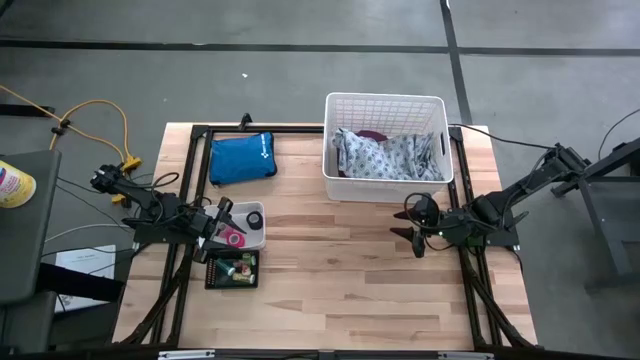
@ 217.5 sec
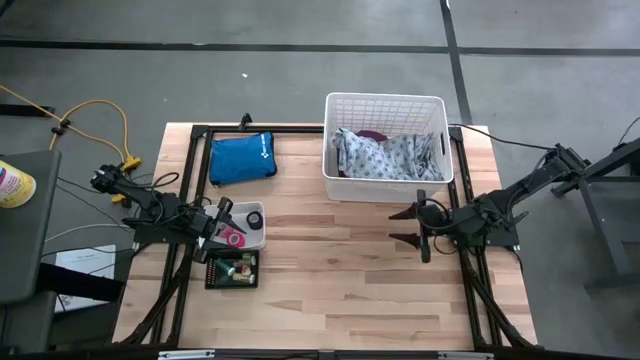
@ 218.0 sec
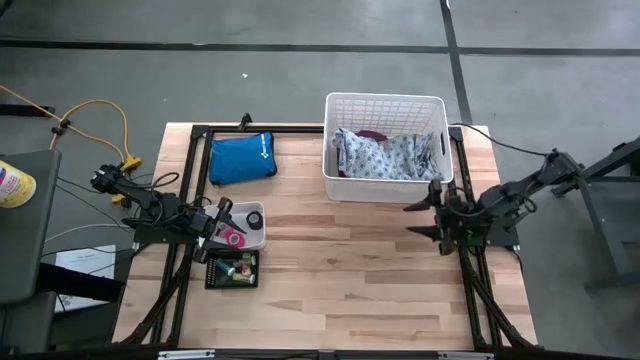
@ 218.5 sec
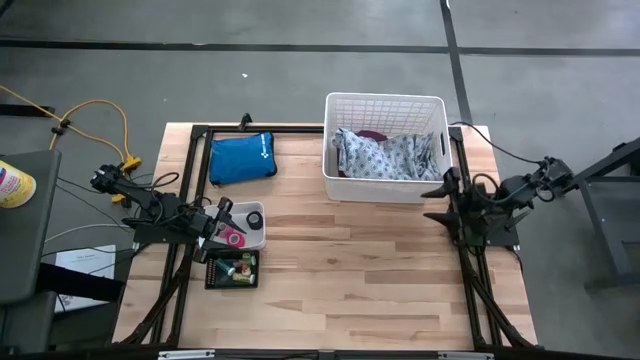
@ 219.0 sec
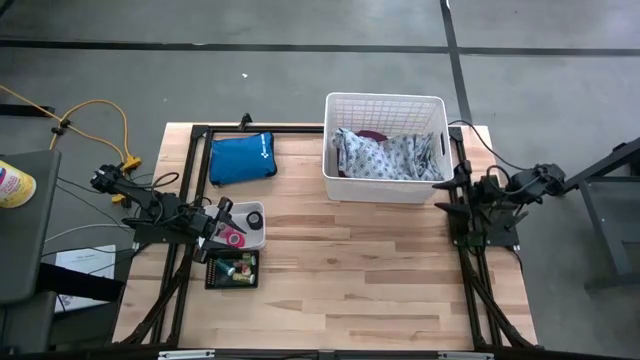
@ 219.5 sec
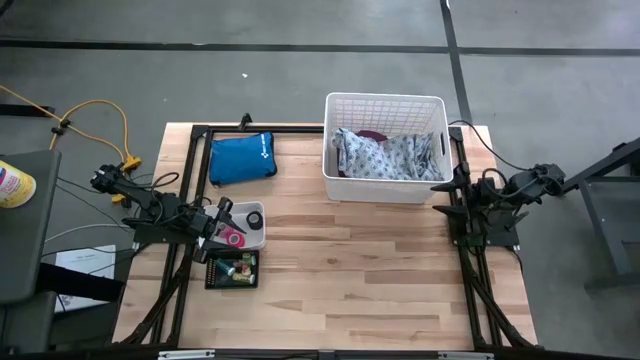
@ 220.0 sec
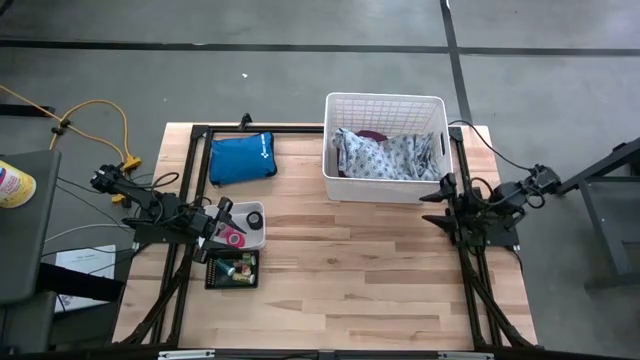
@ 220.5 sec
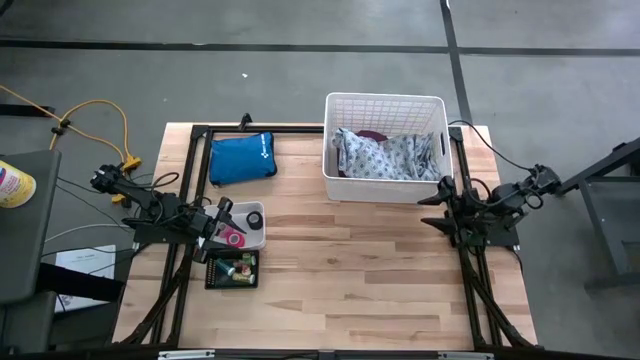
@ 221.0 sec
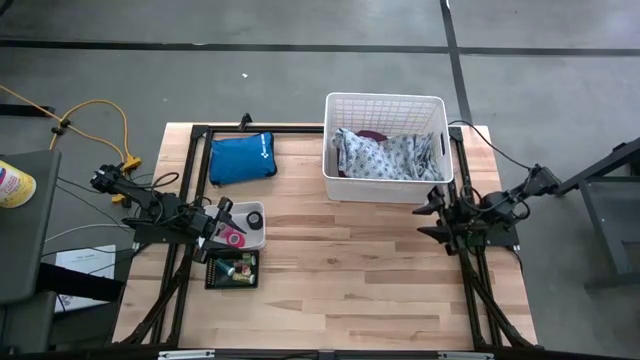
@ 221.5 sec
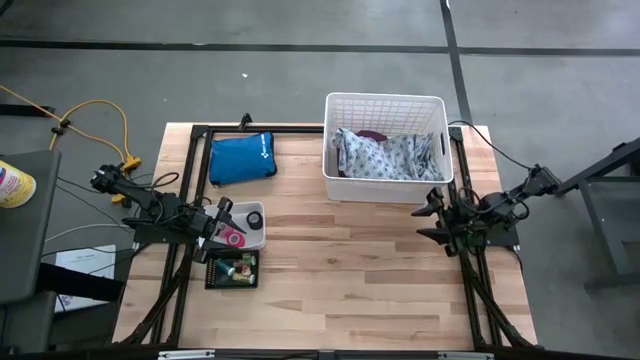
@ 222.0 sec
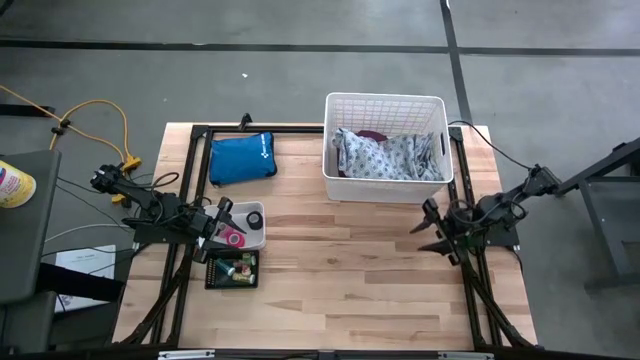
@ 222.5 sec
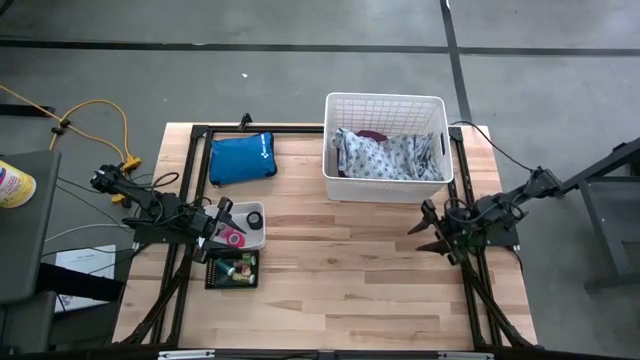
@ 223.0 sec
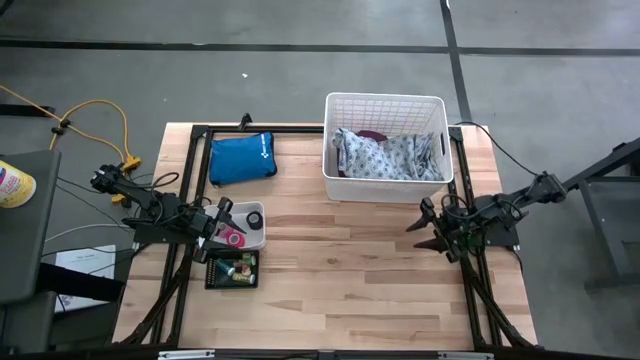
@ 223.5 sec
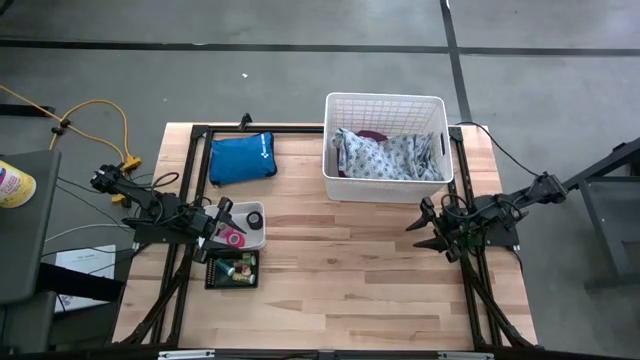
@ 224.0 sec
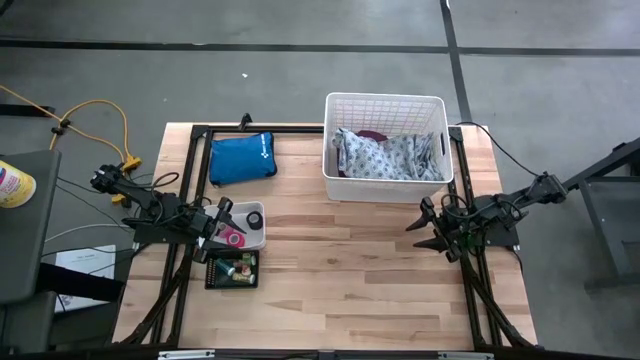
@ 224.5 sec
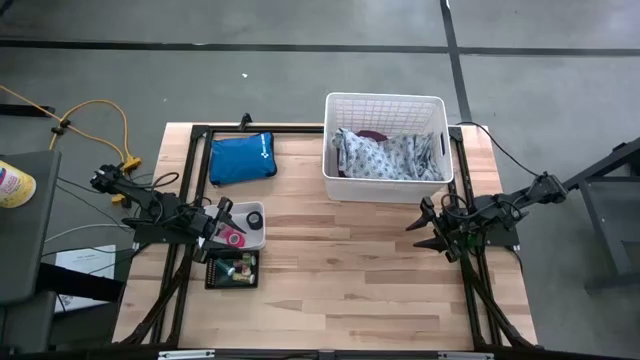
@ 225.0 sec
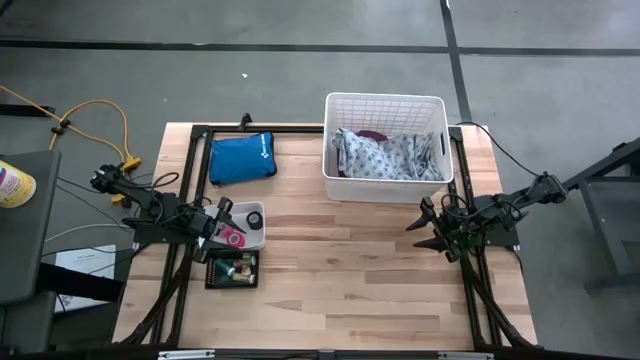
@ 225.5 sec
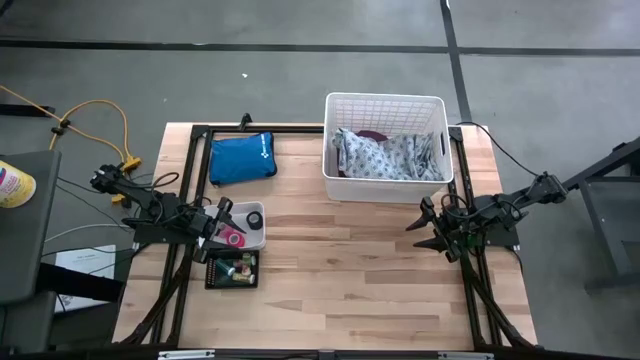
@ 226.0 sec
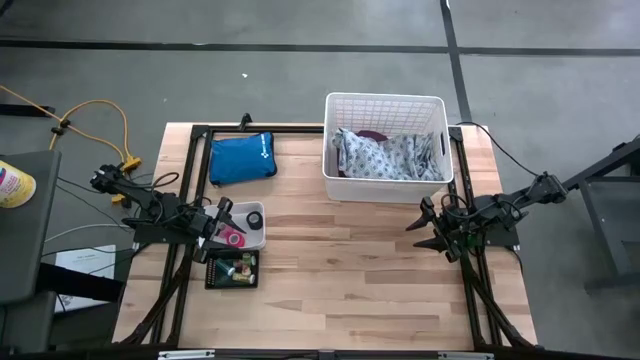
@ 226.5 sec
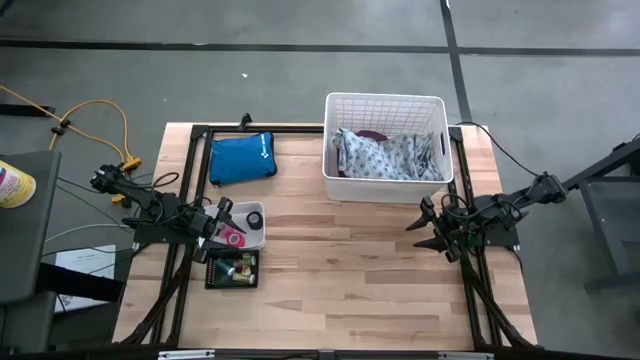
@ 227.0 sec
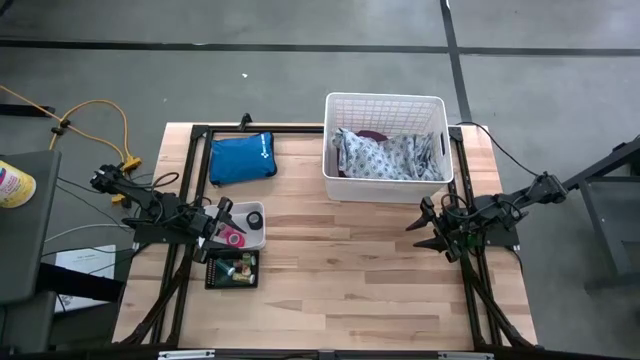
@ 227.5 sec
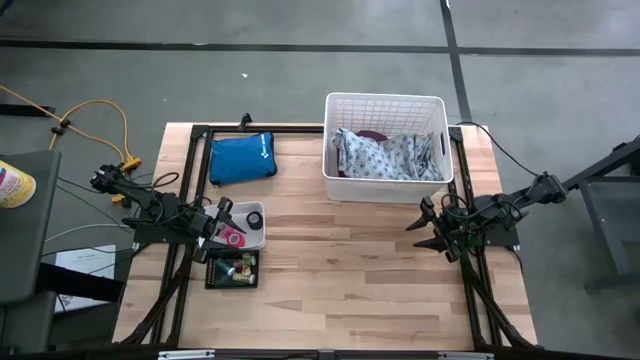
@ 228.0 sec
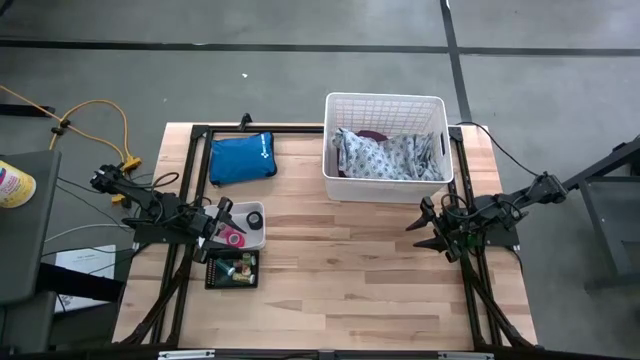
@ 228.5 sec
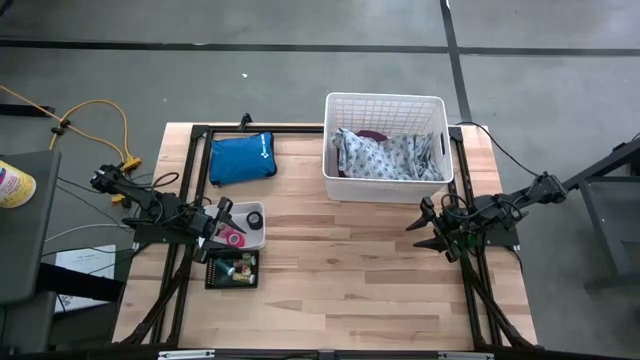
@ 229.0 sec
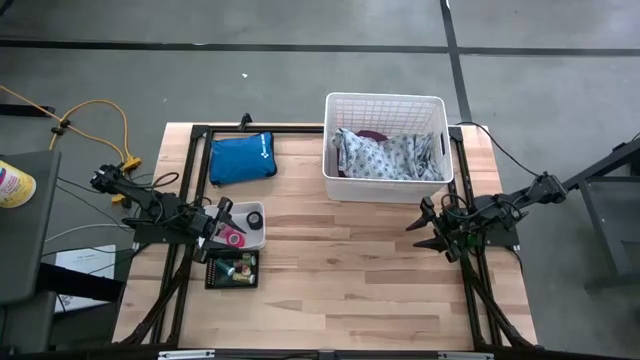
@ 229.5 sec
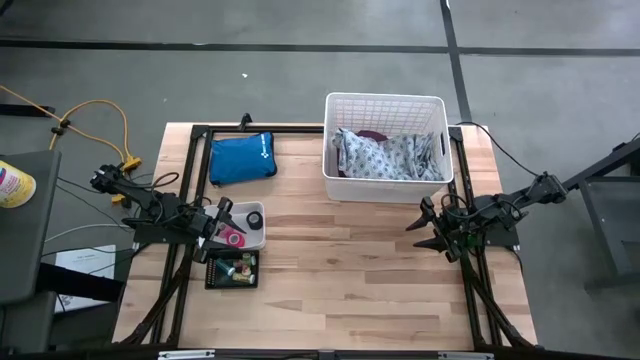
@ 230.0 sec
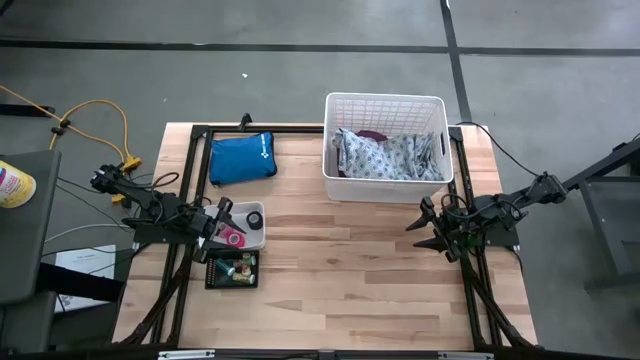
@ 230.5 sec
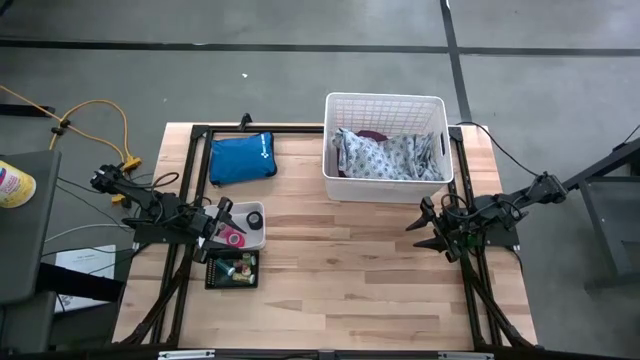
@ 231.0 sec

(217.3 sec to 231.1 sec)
Task: Pick & place medical supplies in basket/bin
Return to Home Position

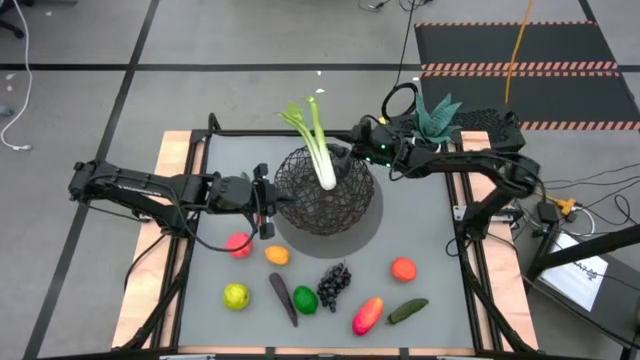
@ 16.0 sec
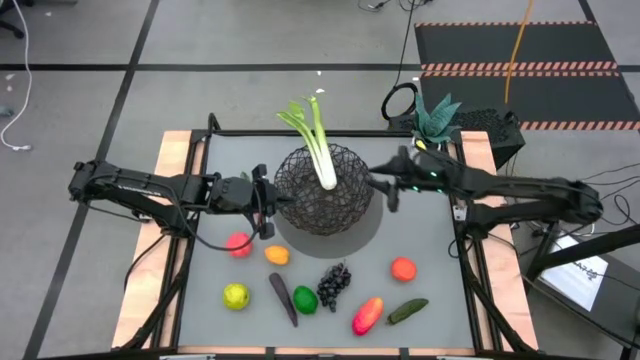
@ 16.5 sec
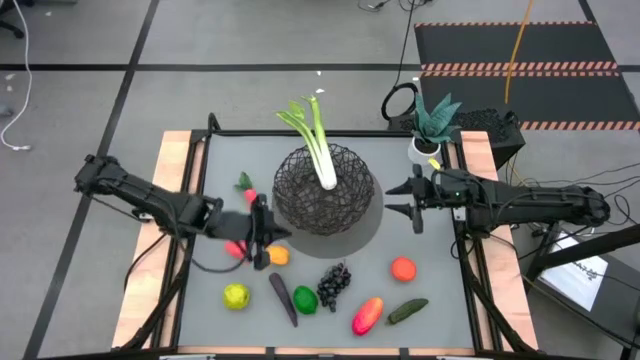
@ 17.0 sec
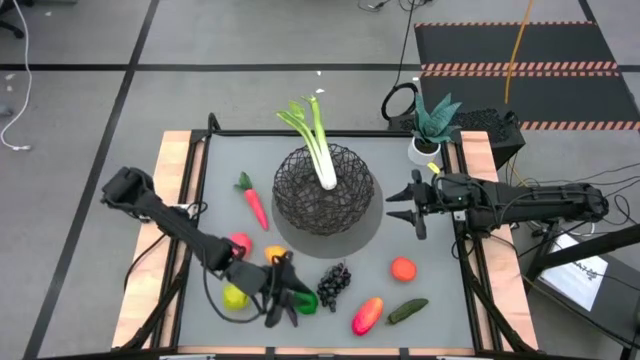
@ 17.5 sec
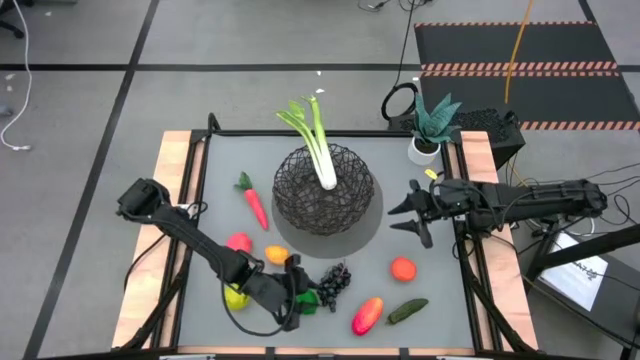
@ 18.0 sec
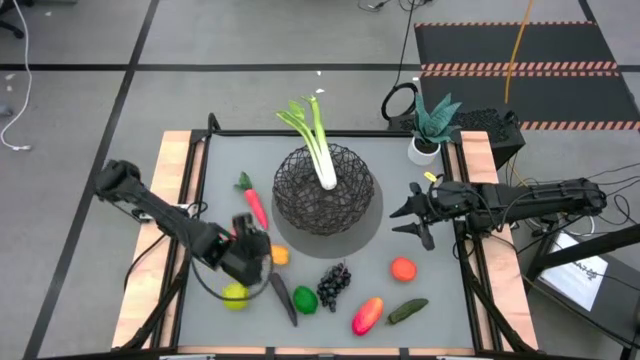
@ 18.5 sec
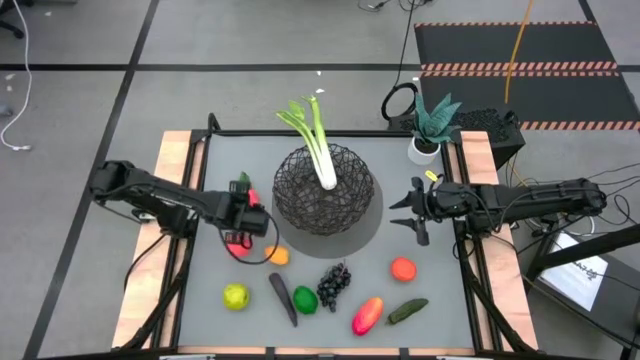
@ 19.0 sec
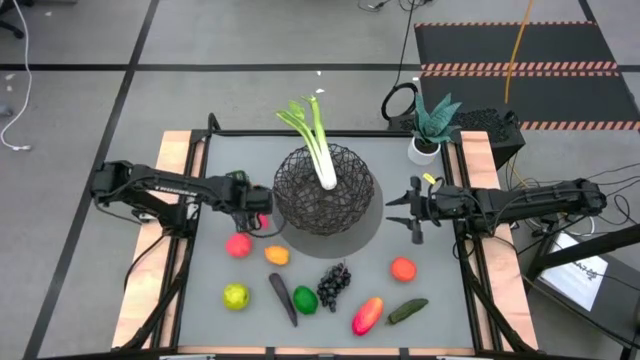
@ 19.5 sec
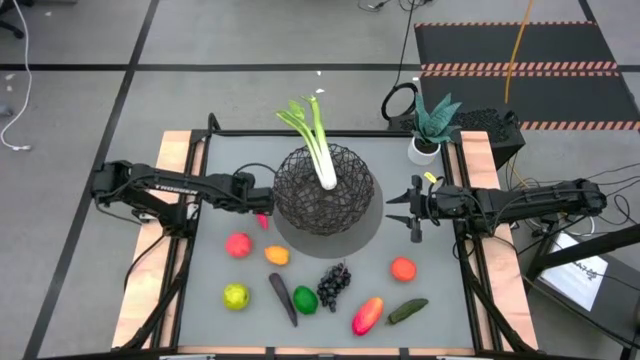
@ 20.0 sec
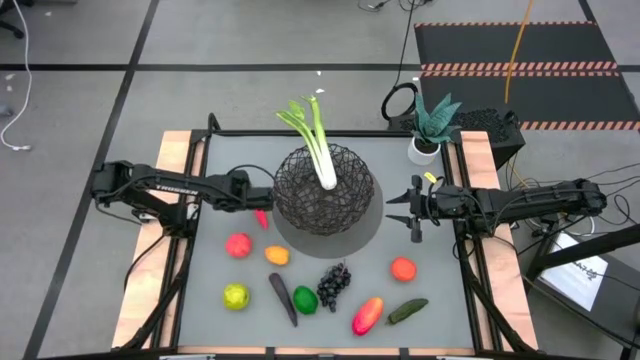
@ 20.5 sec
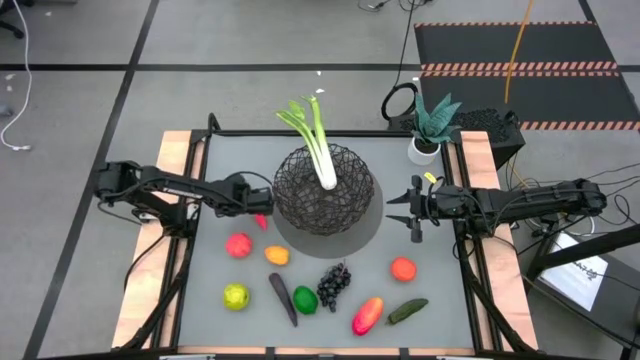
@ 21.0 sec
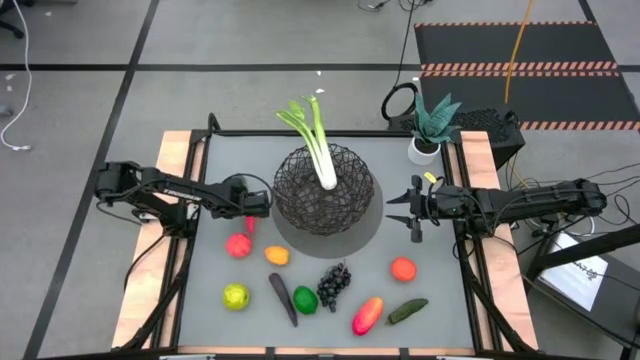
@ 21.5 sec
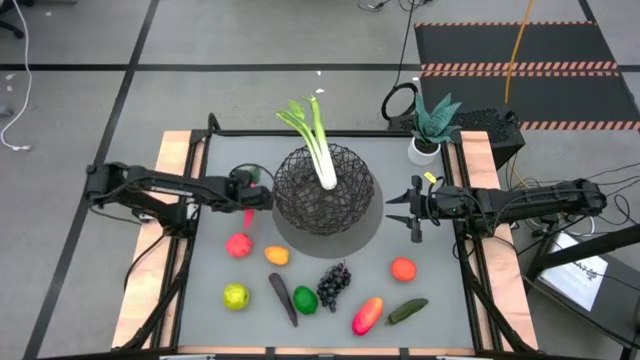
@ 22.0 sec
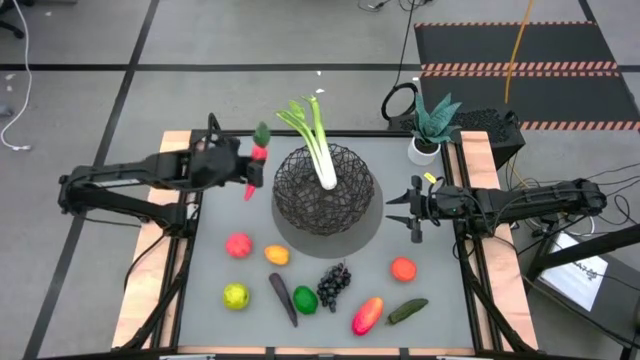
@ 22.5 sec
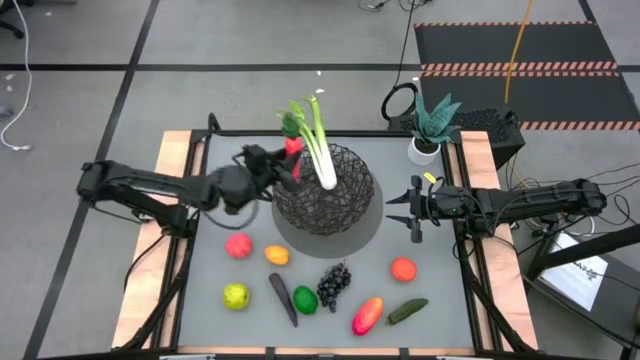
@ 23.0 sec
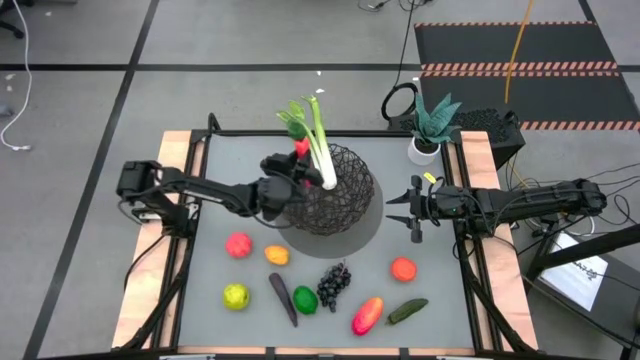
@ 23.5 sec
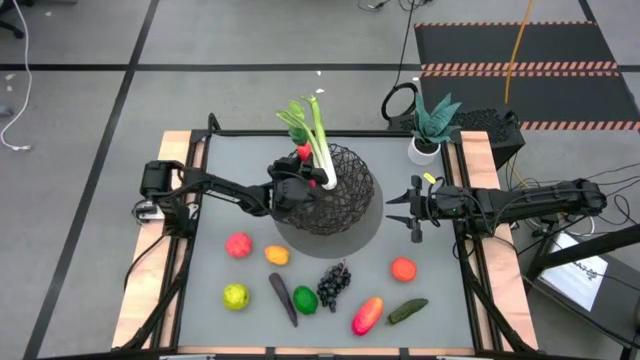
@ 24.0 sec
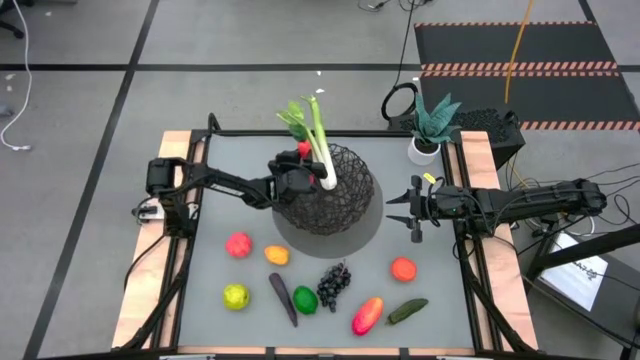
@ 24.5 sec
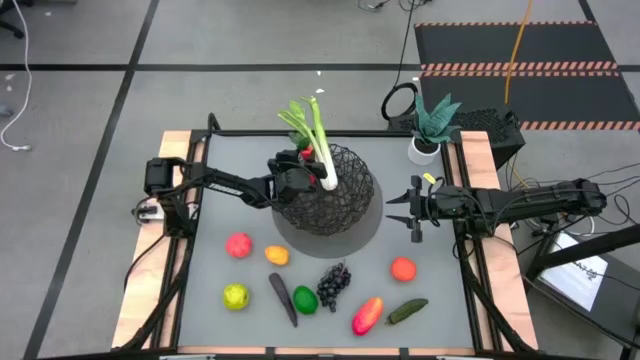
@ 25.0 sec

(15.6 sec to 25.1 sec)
Task: Build produce basket
Put the orange carrot into the black woven basket
